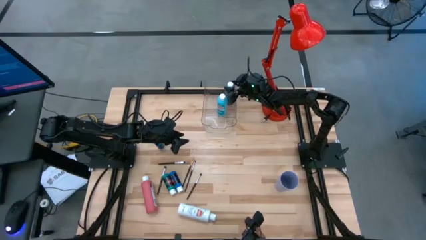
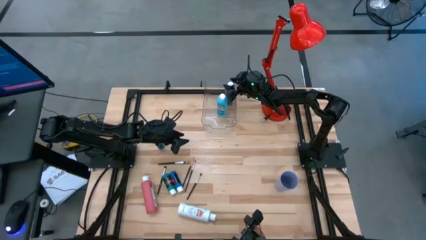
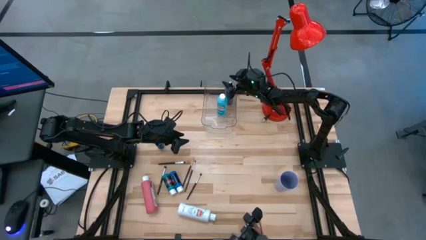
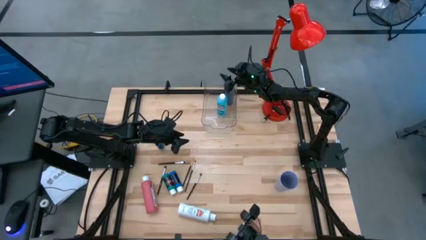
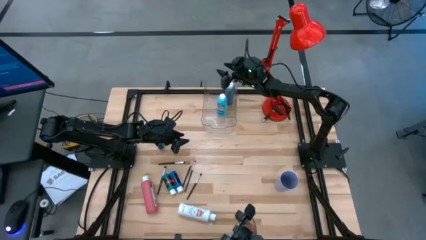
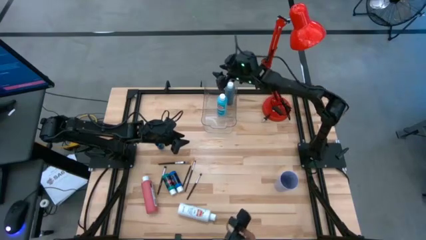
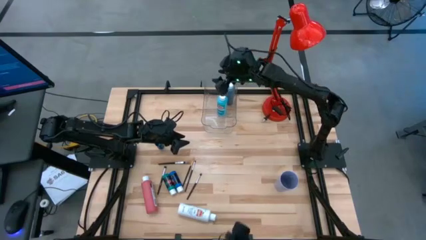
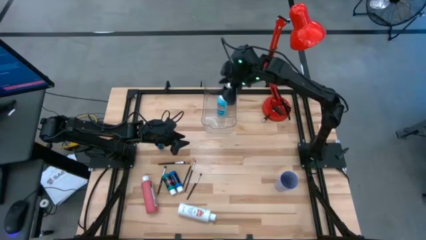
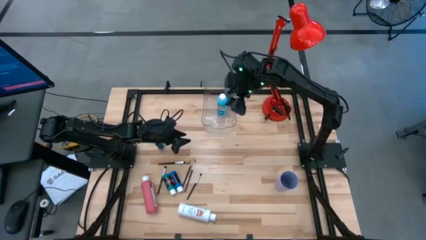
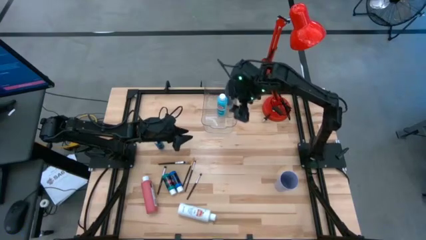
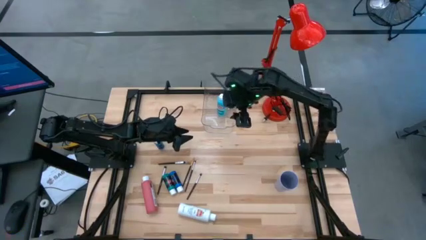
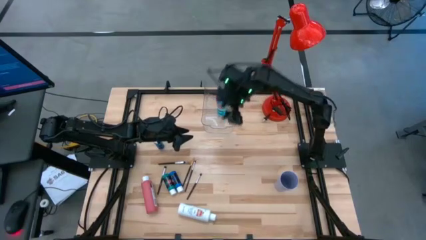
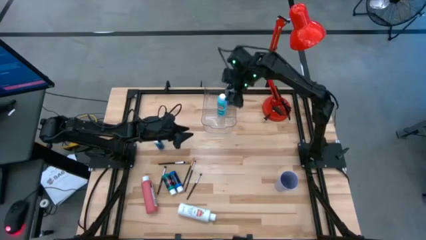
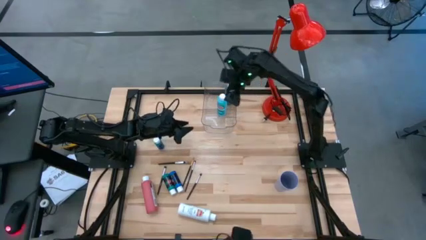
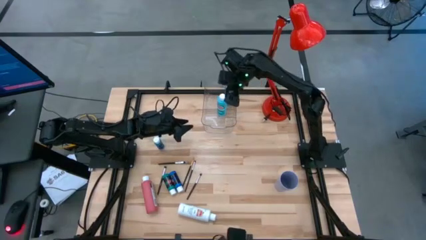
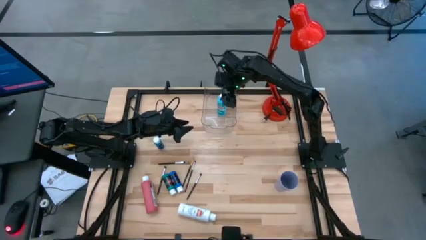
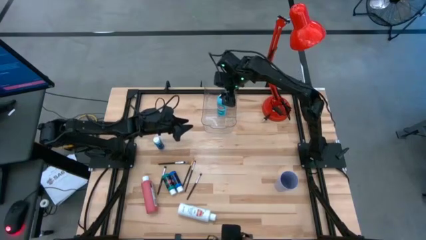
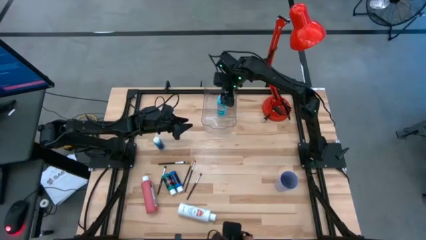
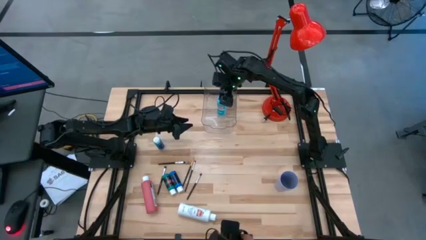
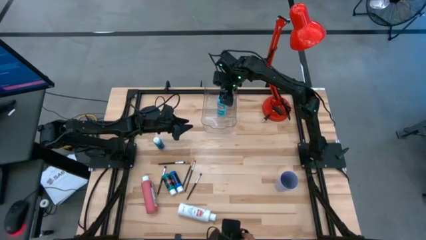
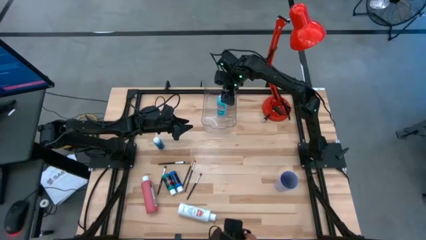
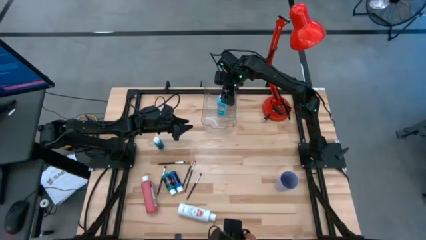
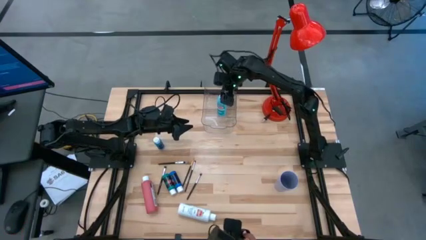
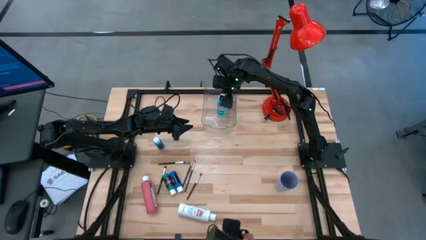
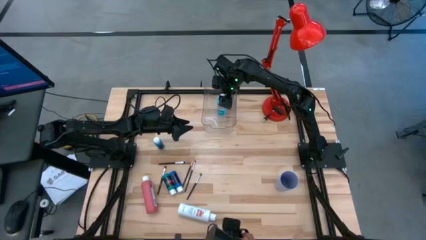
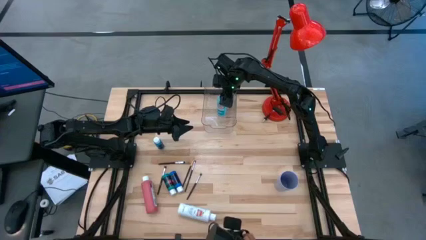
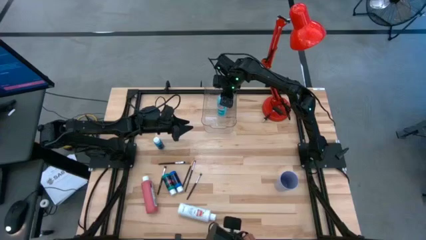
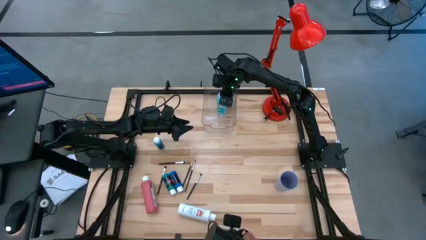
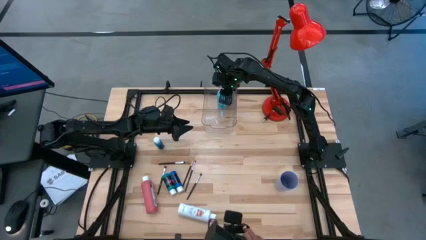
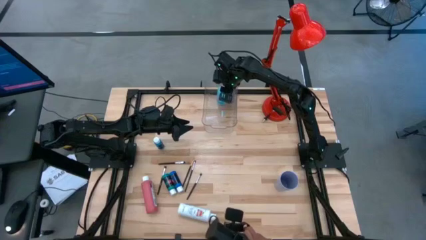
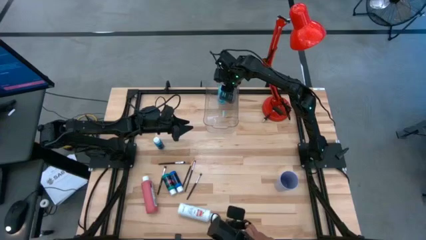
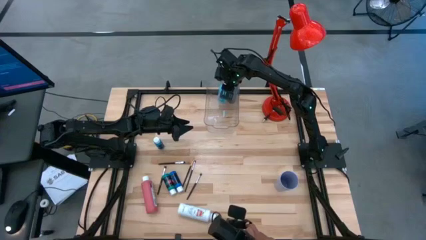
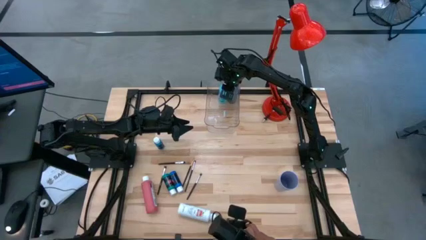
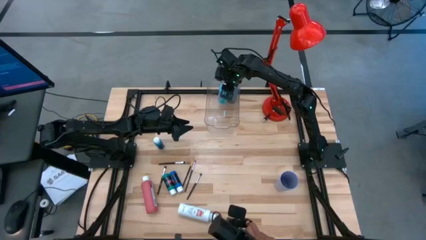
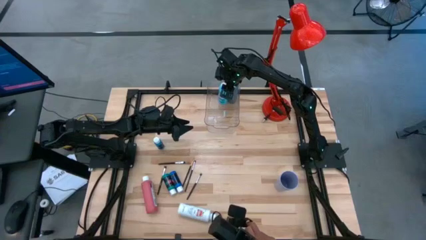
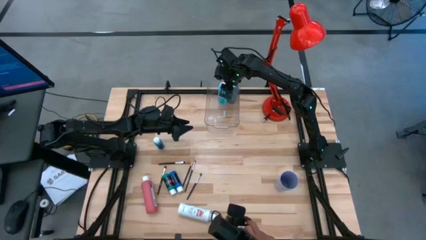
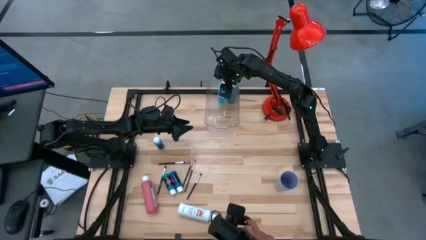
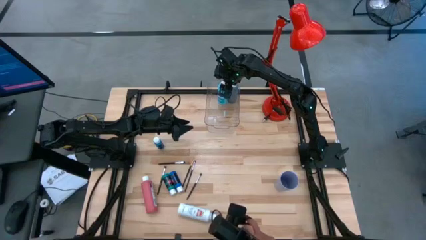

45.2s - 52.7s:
Task: Pick & Place Paint Supplies
Adjust the light blue paint bottle

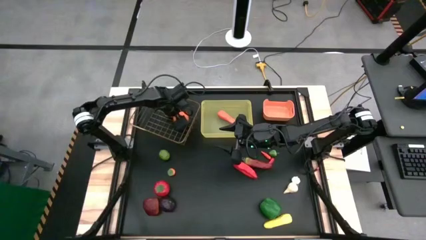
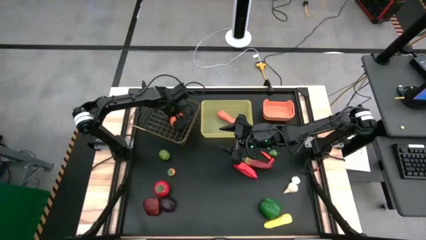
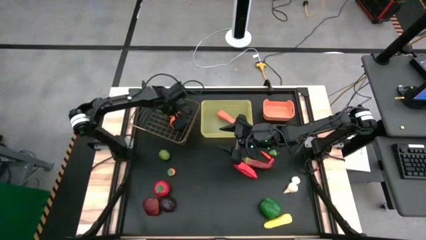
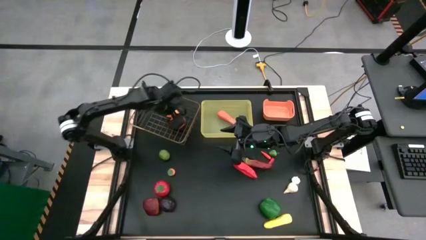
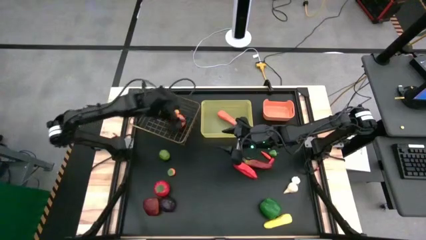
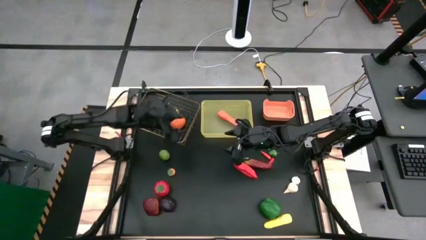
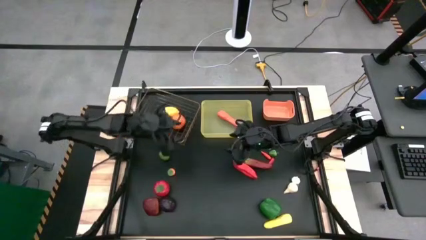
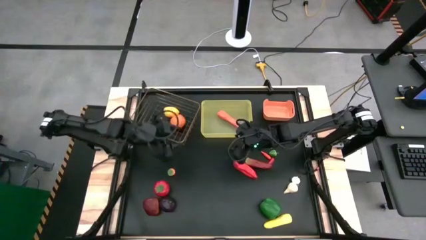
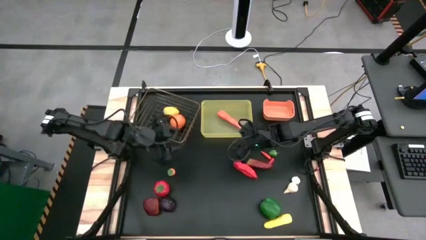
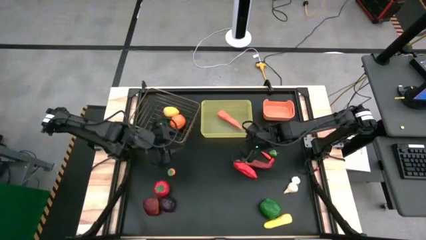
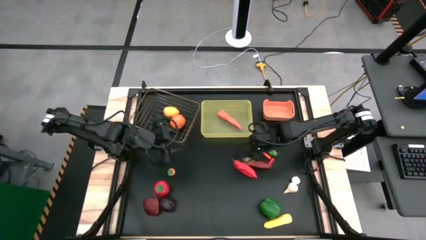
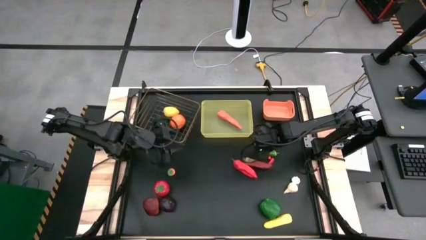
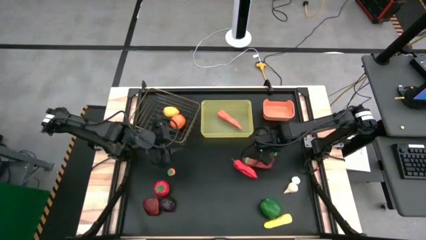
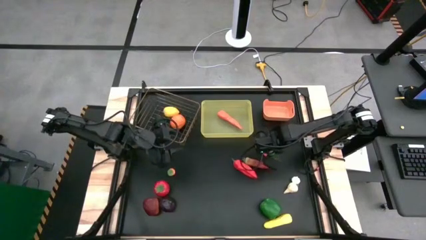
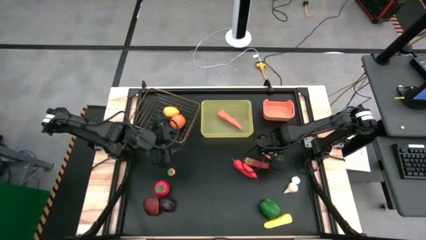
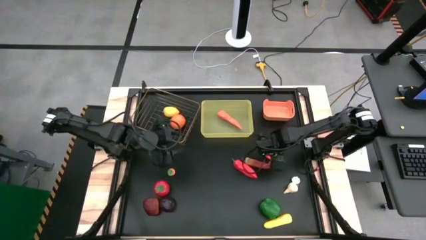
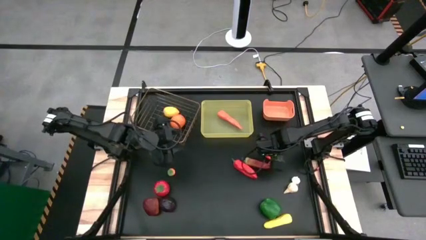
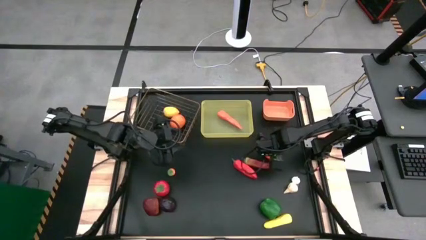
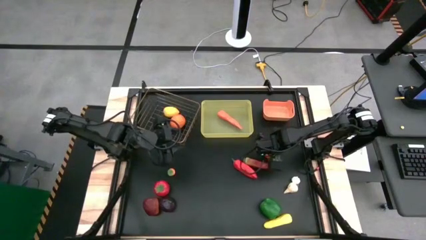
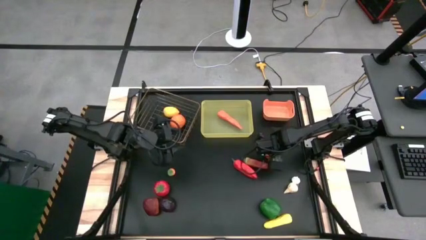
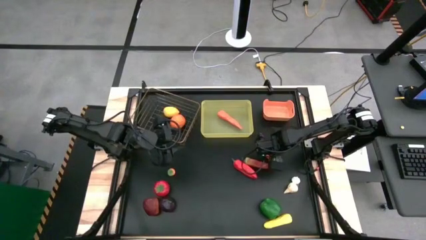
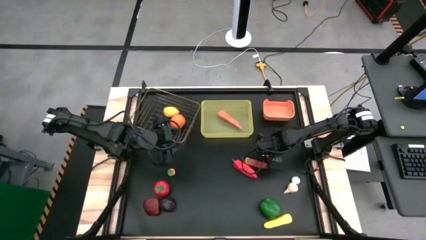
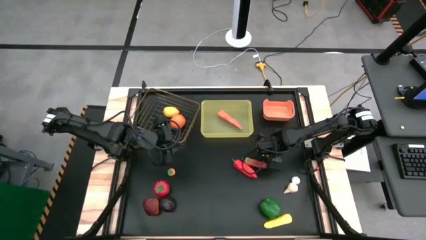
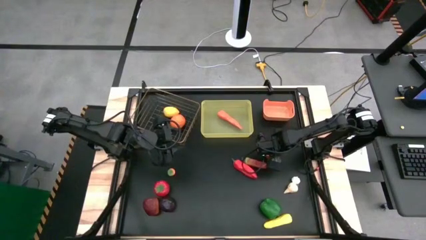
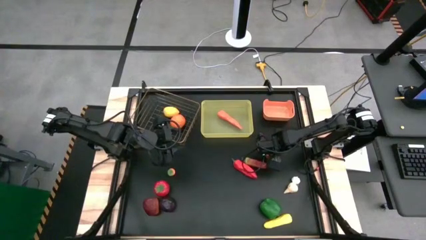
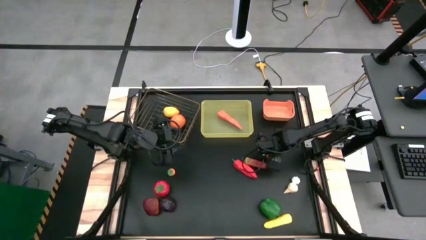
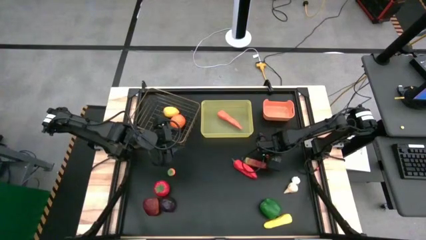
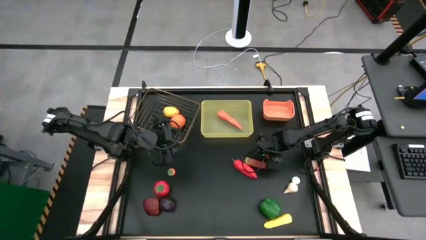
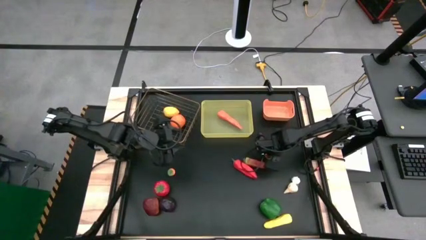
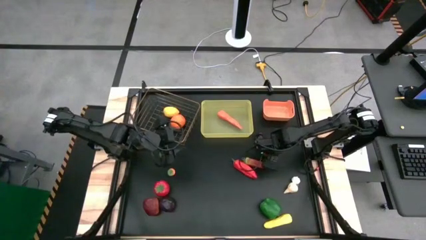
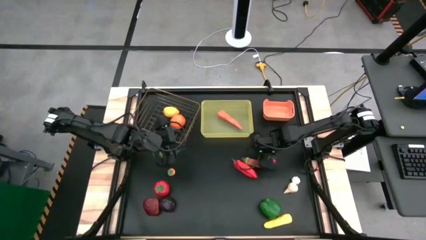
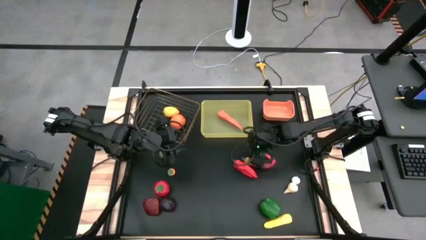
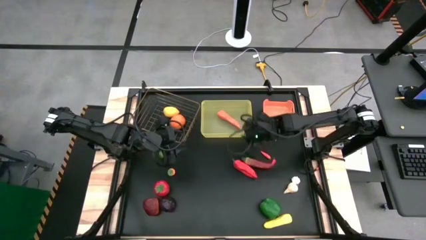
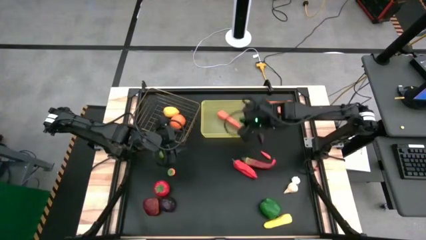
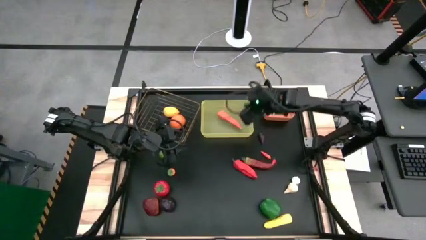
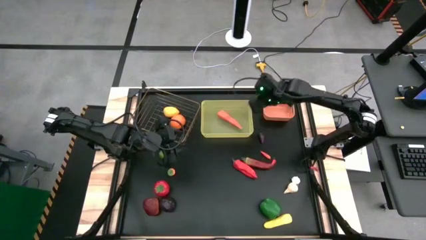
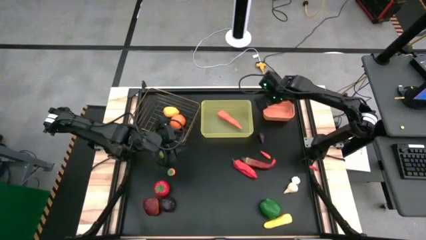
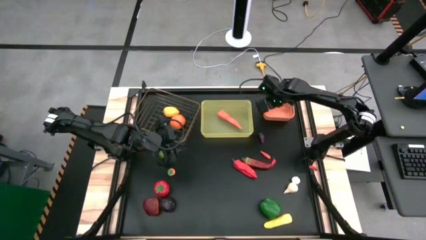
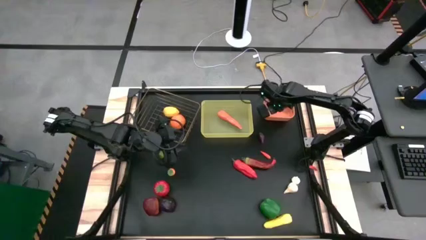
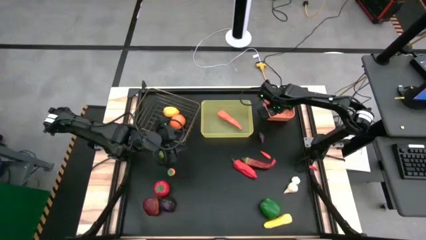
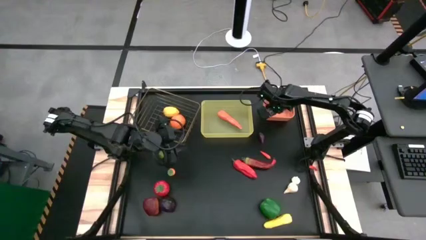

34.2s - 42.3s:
Task: Sort produce into baskets
Put the jalapeno pepper into the orange bin
